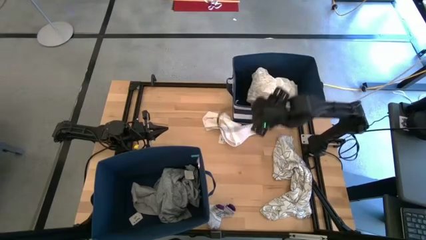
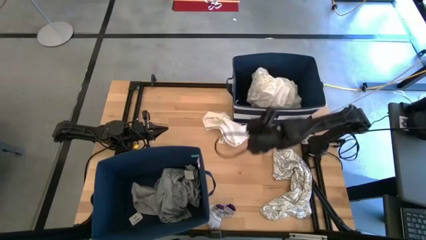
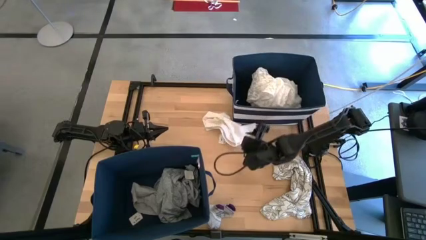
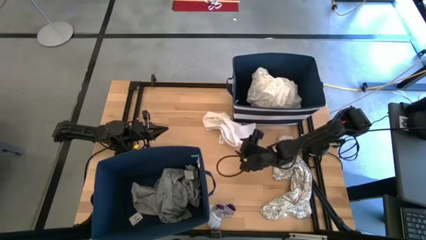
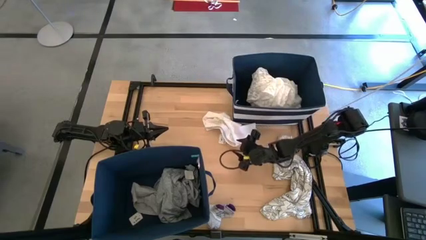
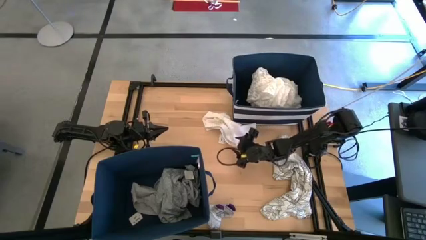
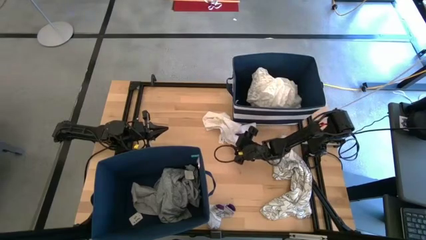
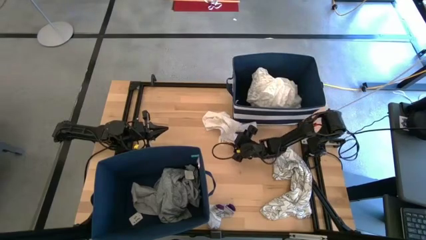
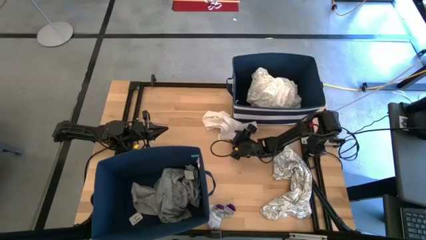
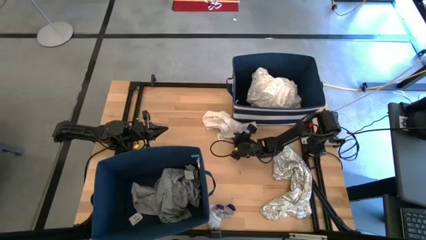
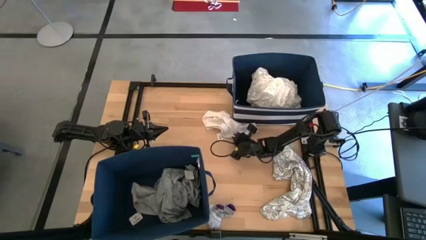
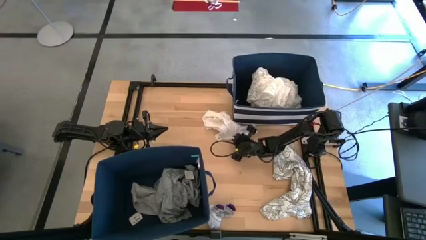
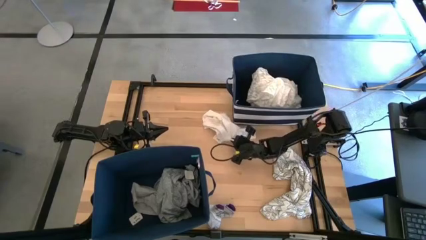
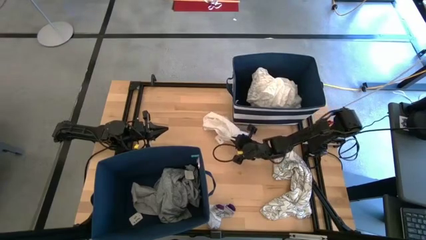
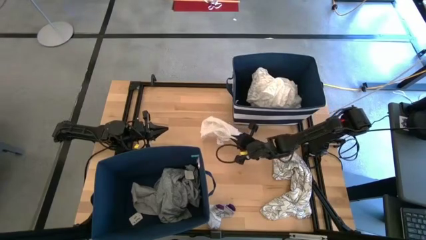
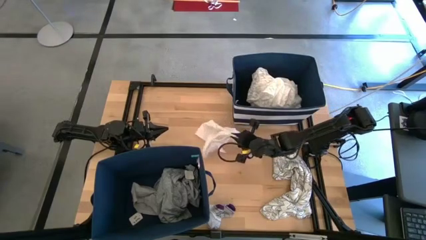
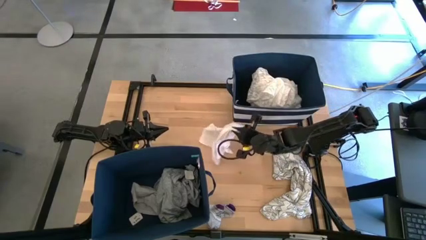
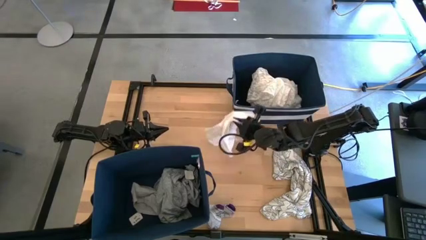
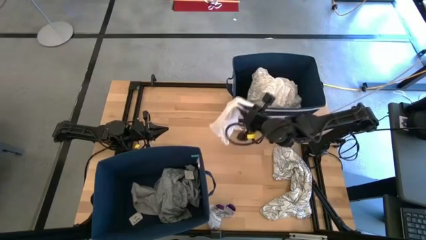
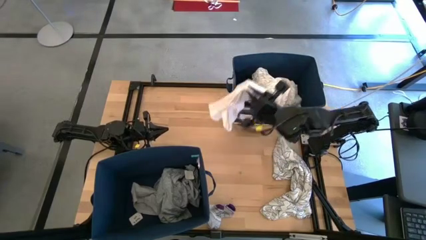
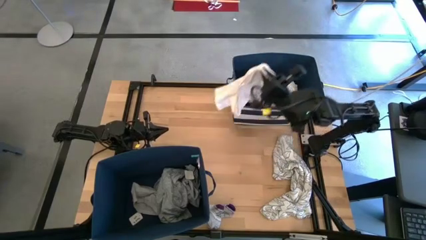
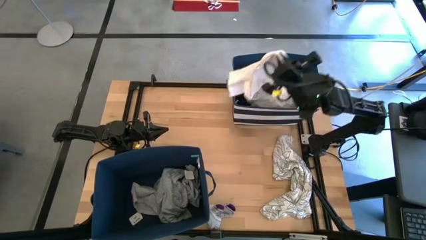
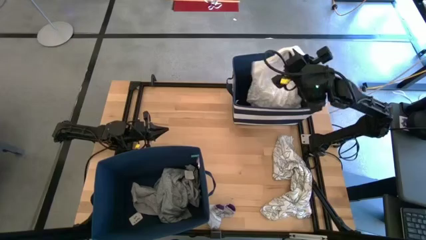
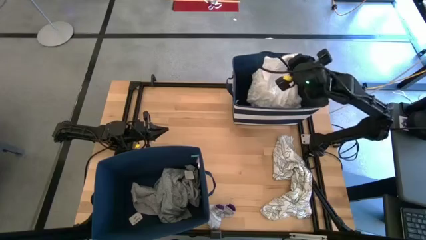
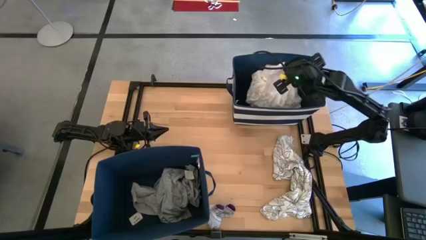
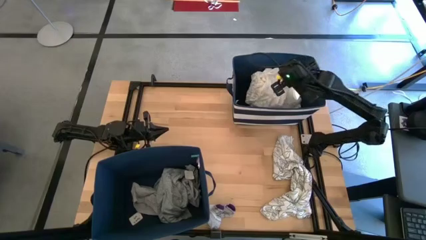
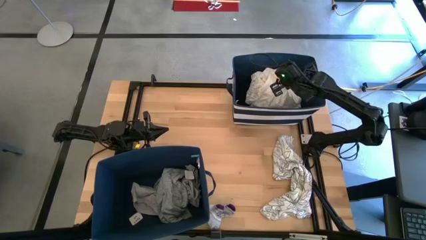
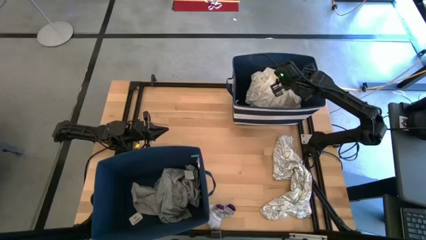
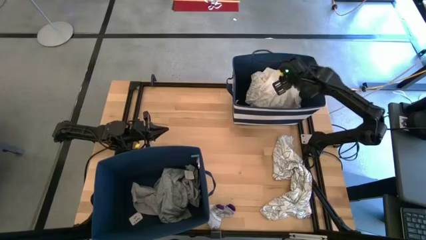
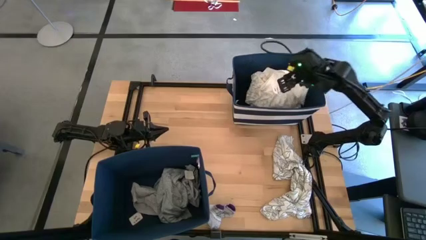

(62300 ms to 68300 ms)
Task: Sort clothes
Put the white underwear into the top right laundry bin

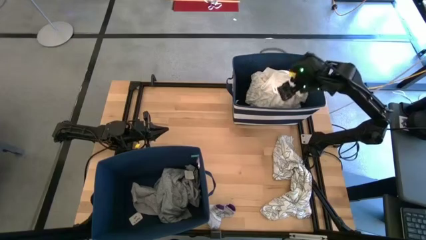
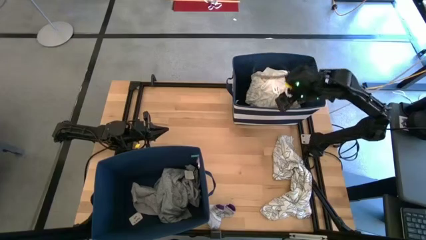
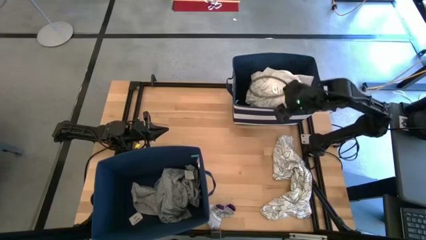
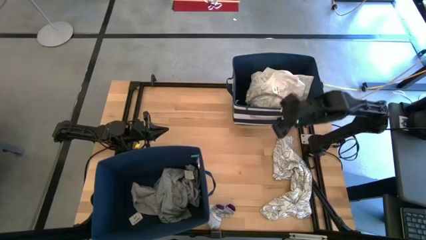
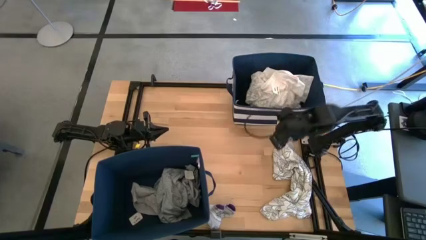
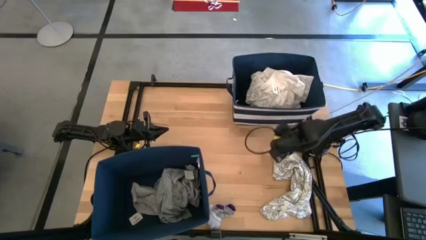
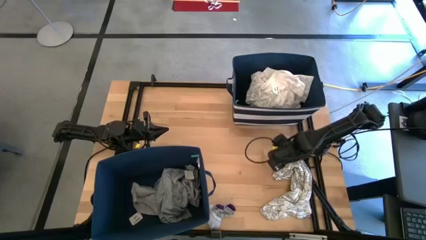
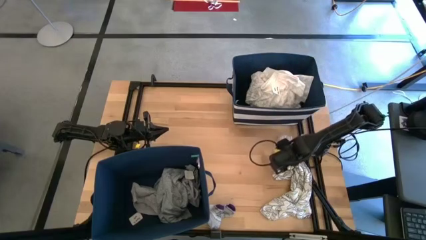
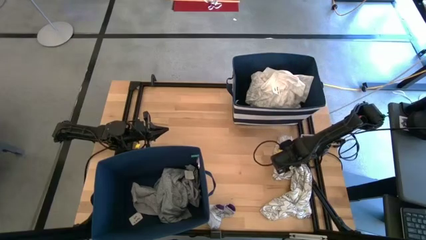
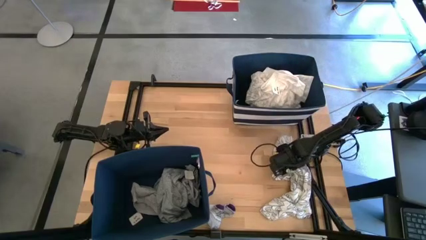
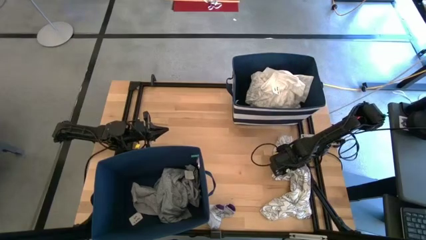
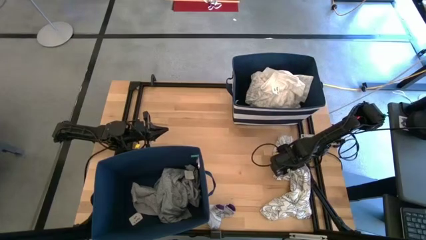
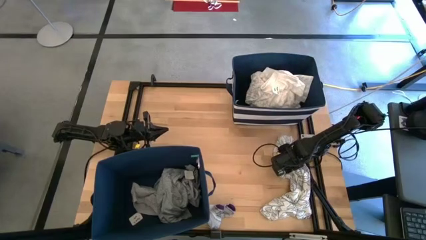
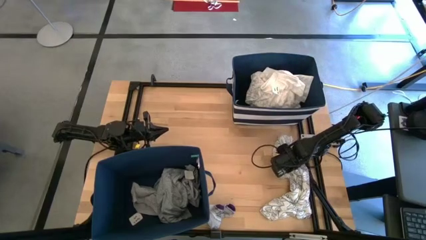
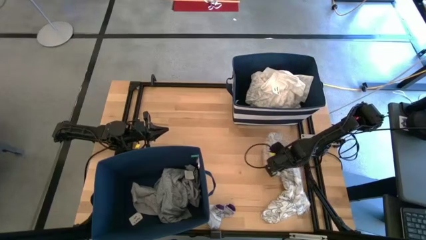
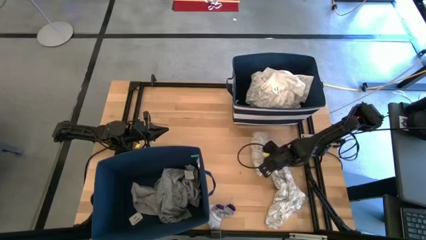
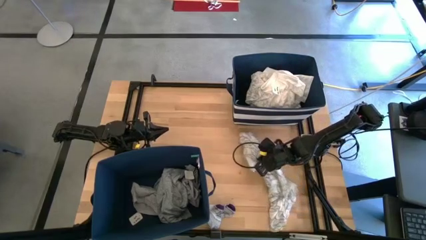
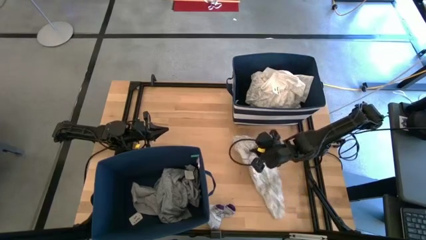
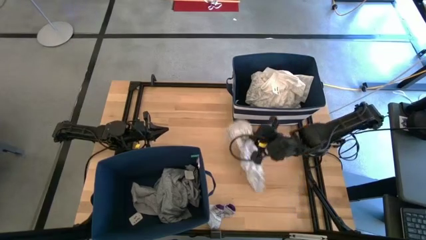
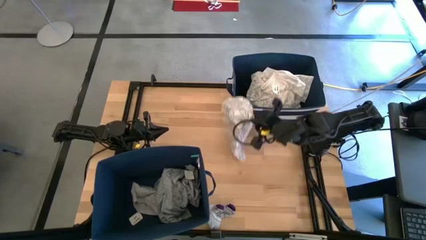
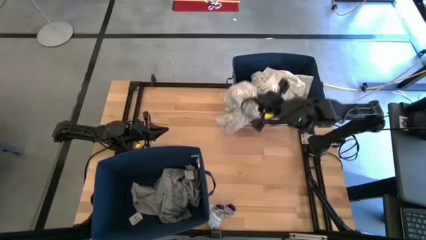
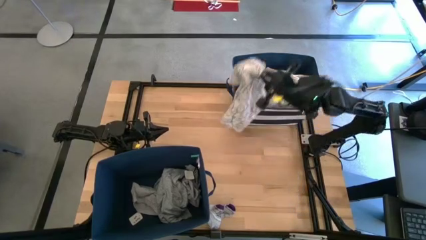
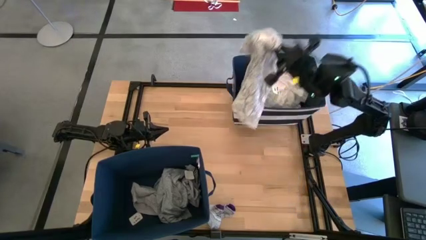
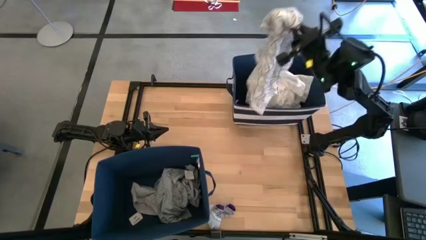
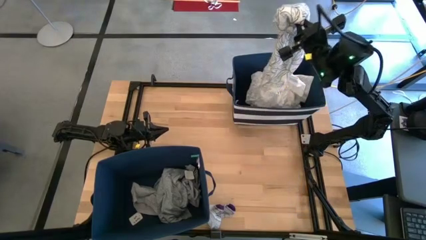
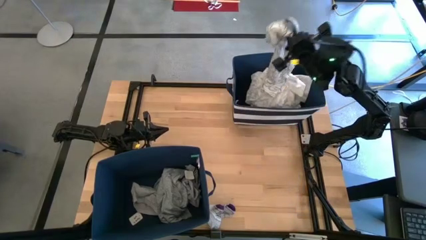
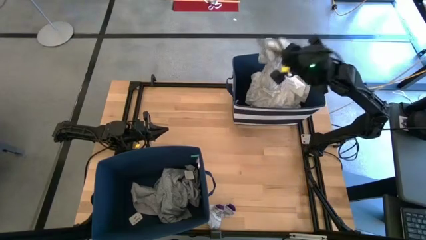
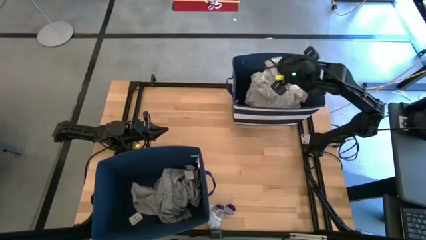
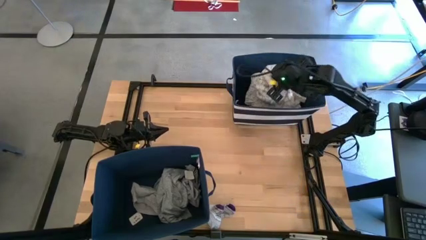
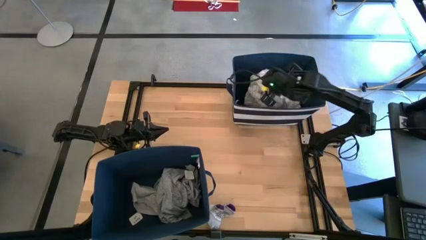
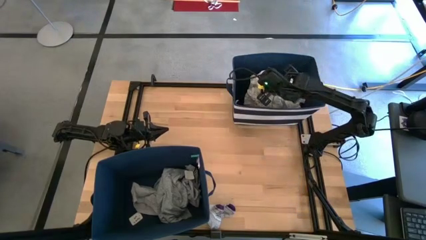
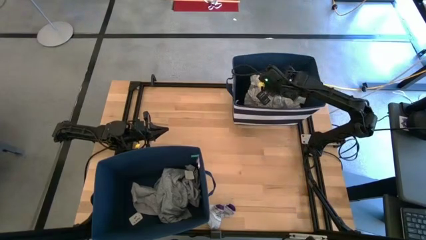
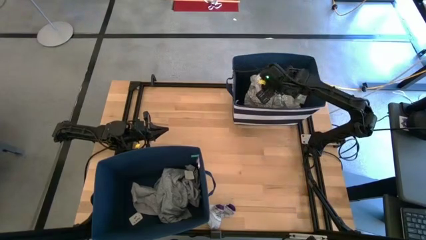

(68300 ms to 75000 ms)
Put the white and black shirt into the top right laundry bin

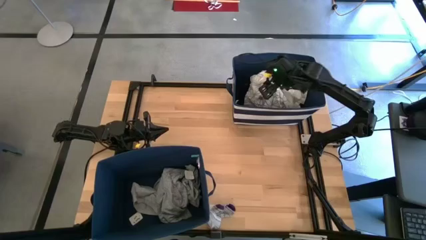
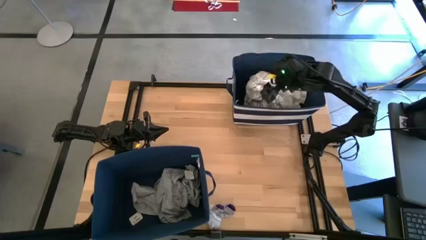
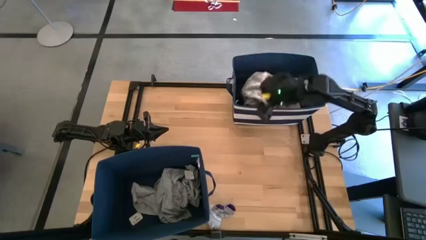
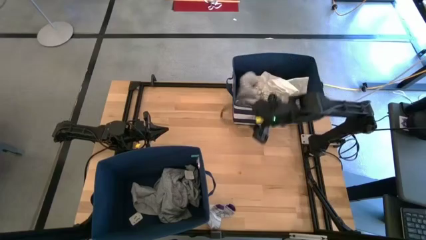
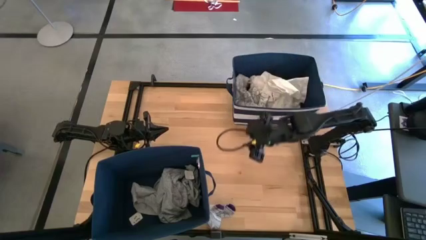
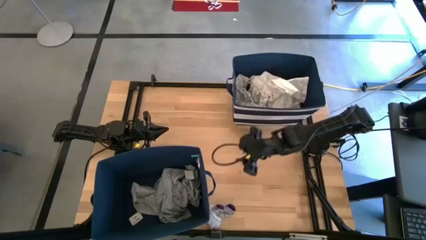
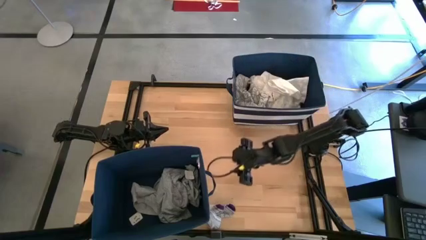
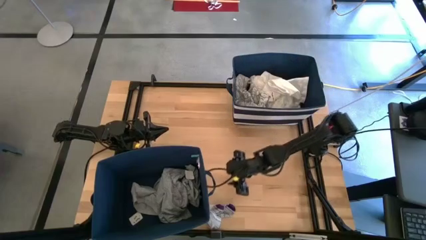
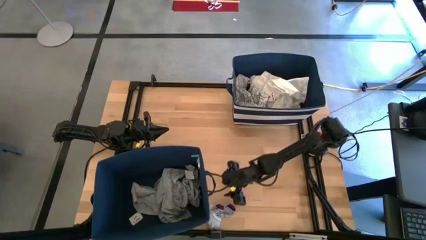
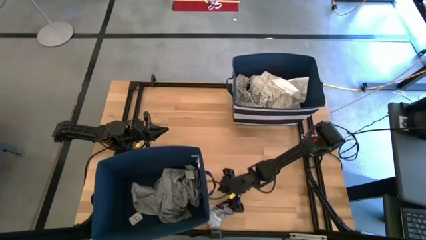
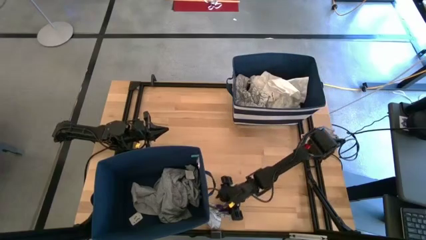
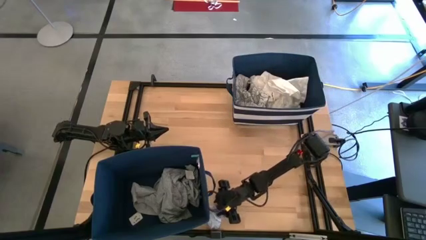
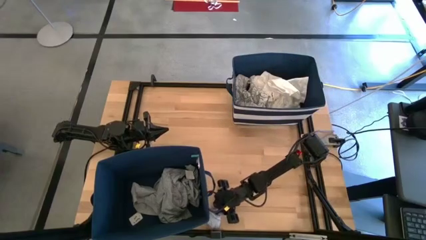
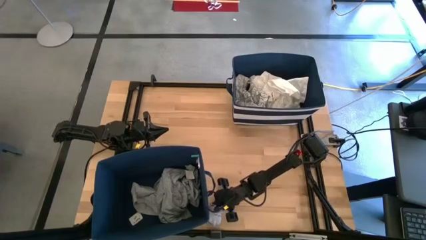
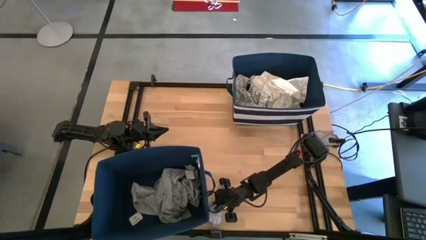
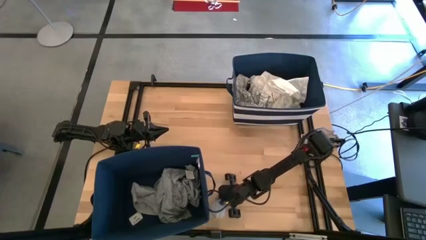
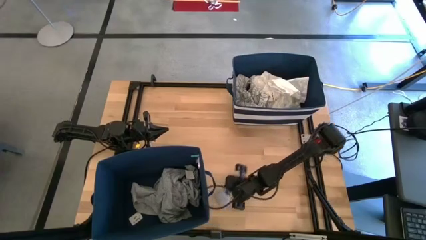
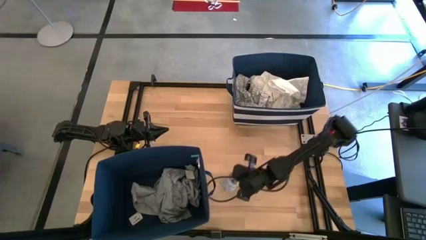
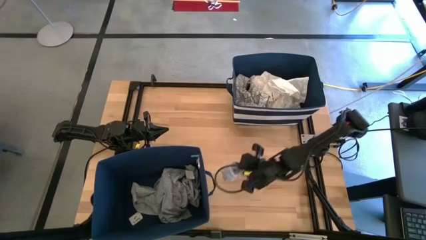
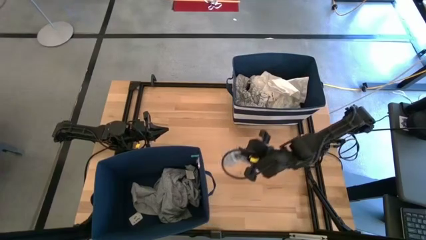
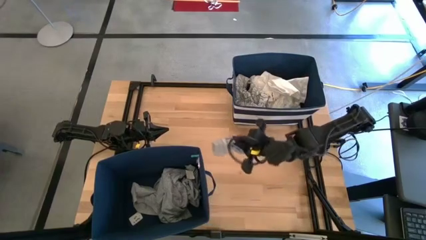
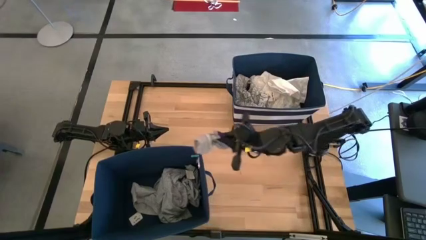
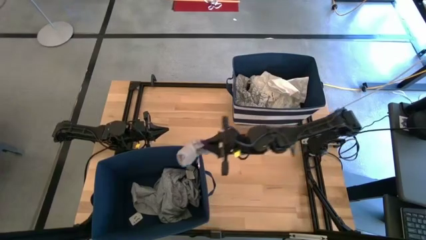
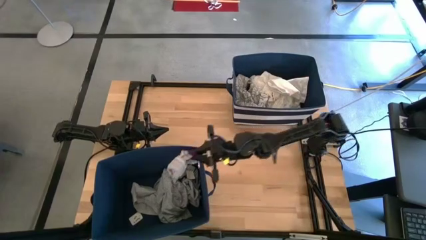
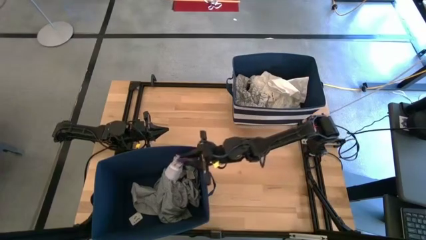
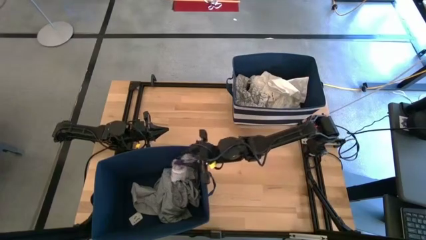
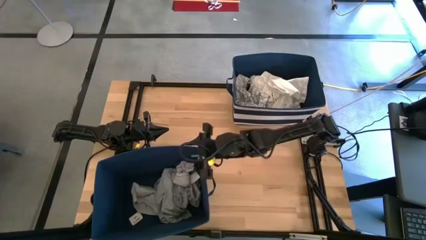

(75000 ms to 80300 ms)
Put the gray socks into the bottom left laundry bin
